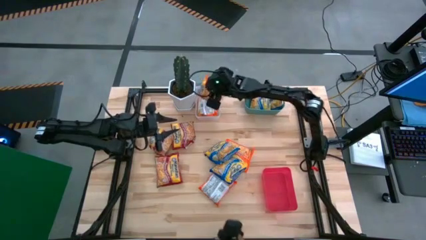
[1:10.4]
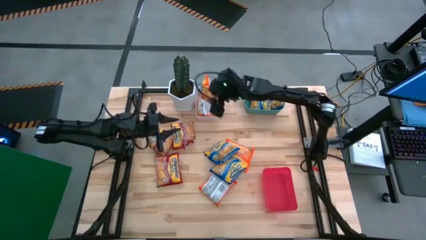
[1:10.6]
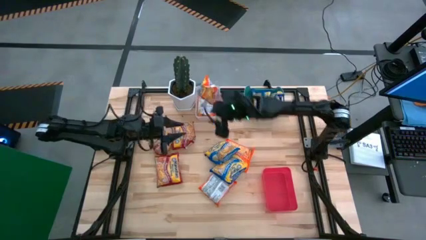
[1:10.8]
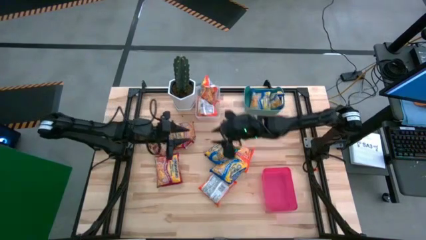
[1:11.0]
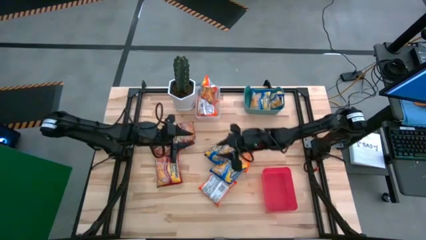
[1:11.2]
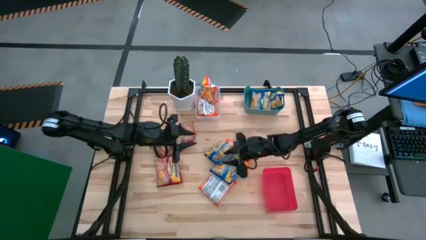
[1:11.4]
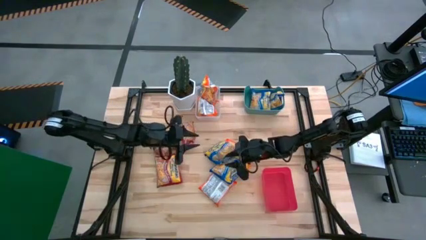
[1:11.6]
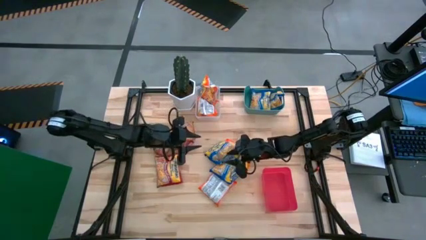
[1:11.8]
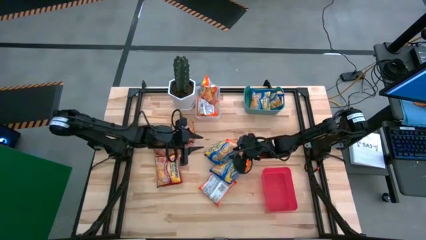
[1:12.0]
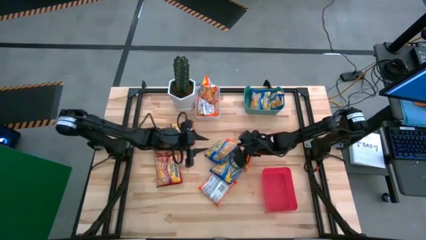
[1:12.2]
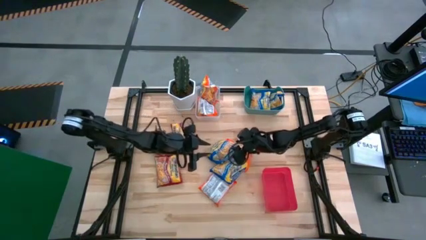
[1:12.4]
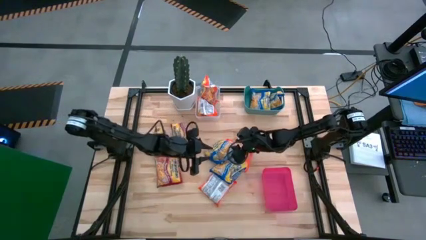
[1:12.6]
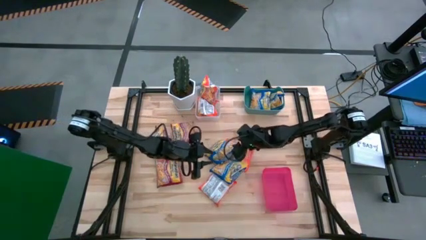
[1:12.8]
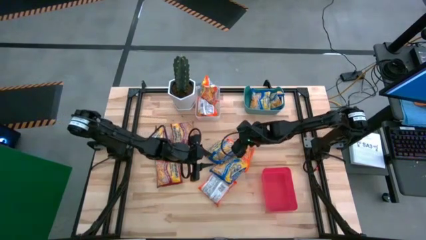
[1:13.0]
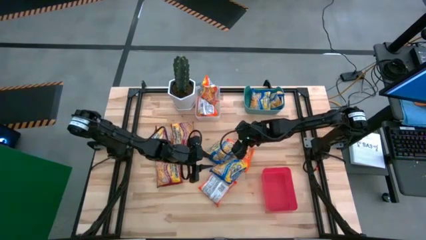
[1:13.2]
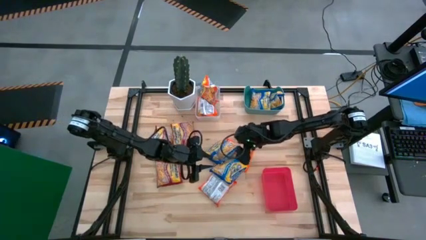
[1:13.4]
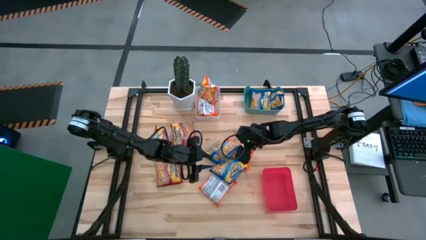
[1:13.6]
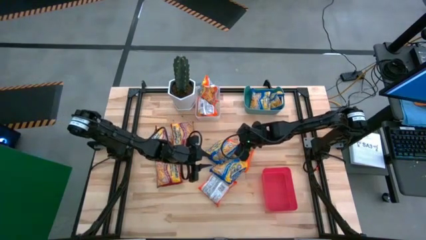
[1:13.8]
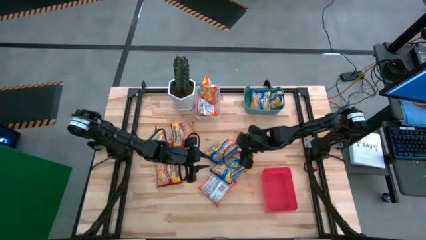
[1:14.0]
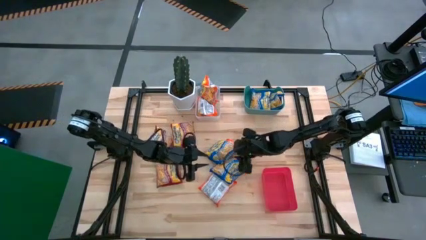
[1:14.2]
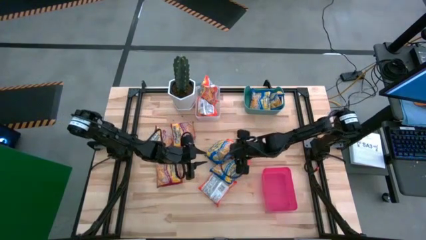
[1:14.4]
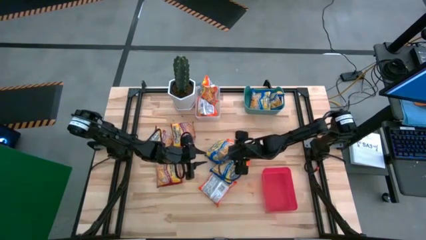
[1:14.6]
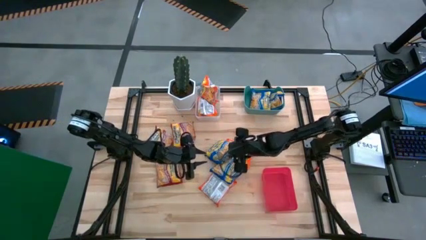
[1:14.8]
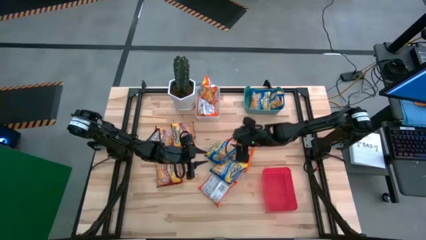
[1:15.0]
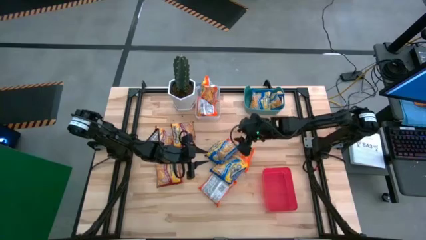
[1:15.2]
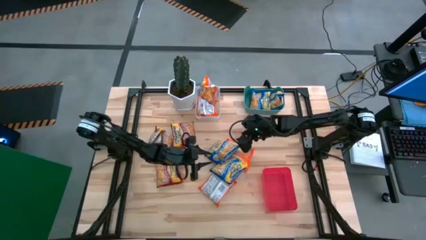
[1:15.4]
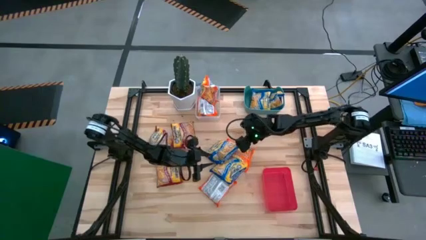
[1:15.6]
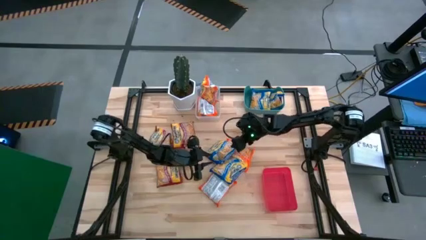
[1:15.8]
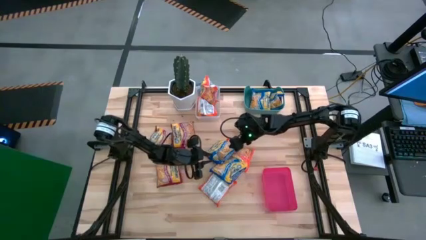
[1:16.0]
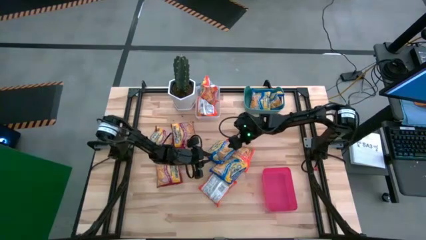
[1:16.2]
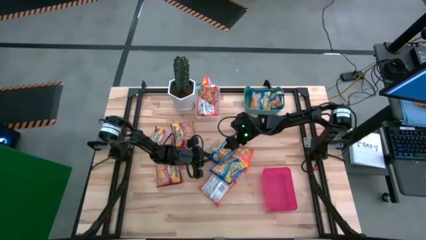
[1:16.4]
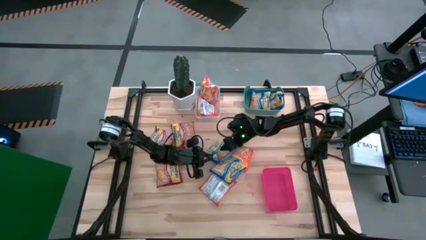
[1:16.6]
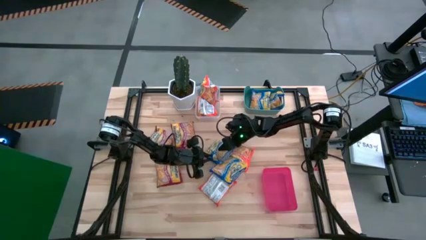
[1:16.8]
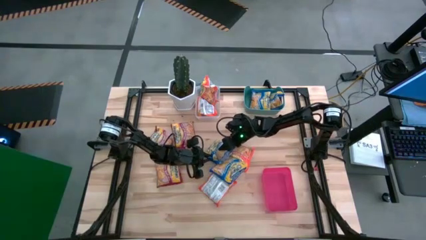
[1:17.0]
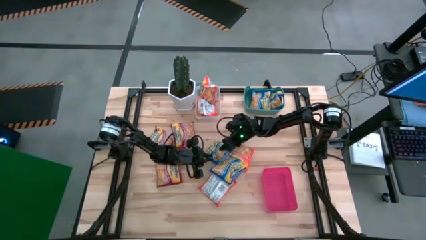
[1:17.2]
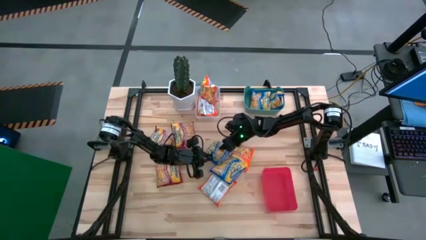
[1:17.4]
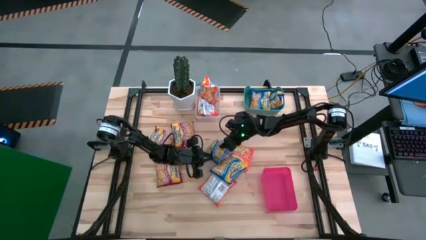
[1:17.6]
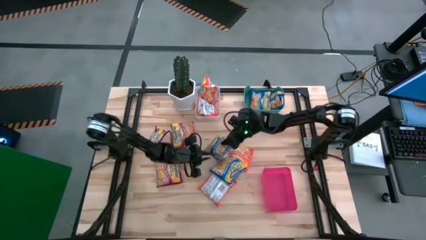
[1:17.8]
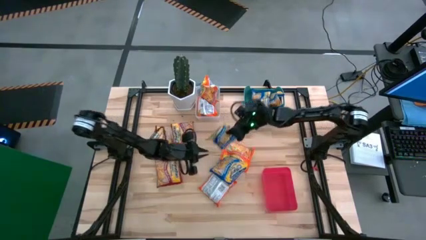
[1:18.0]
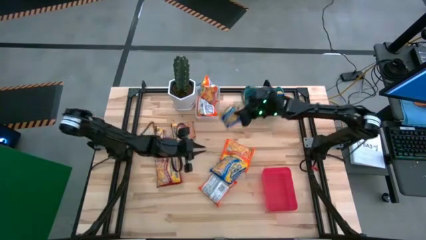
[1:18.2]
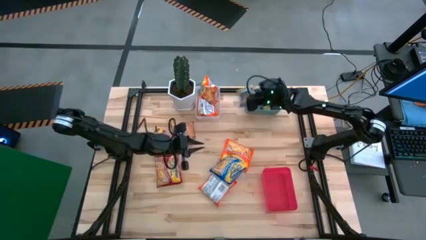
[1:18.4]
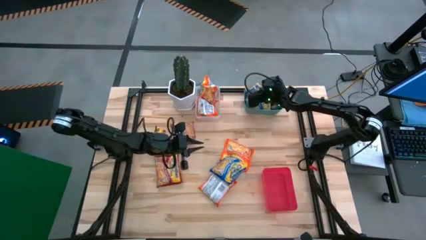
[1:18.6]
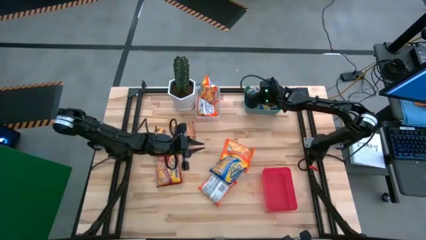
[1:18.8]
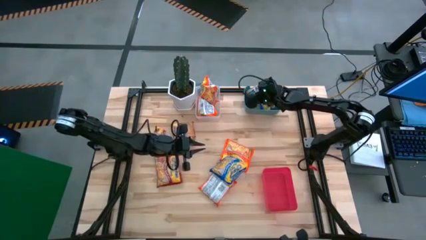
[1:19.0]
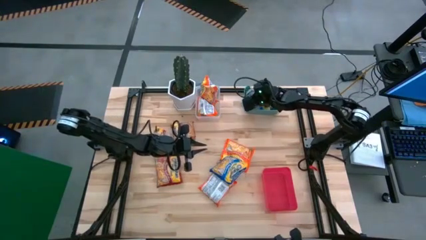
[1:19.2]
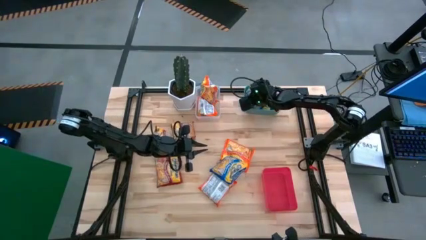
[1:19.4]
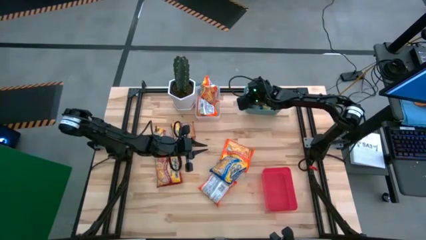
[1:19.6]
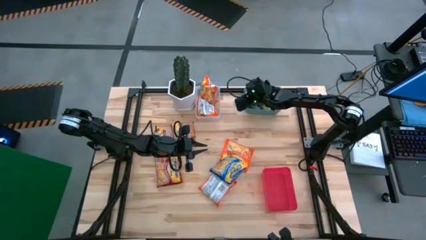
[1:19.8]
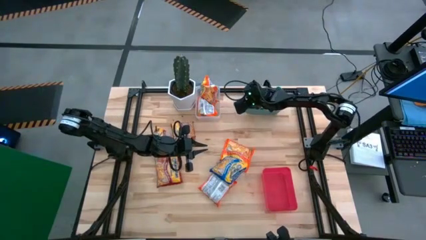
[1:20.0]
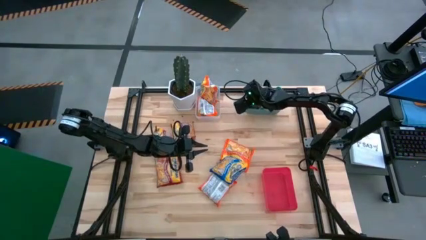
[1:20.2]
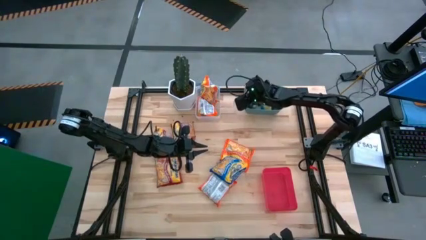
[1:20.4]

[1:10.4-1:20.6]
Task: Sort Maruchan noodles
Put the blue noodle pack into the green bin

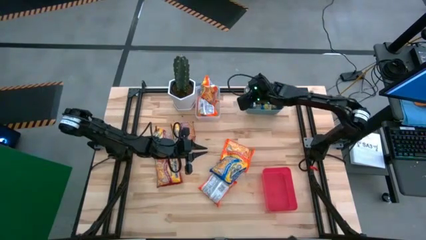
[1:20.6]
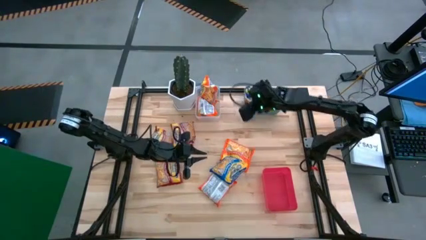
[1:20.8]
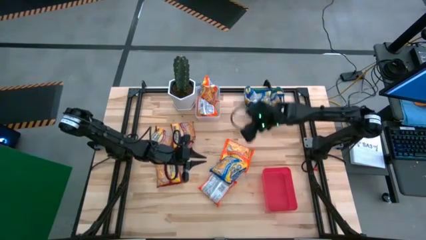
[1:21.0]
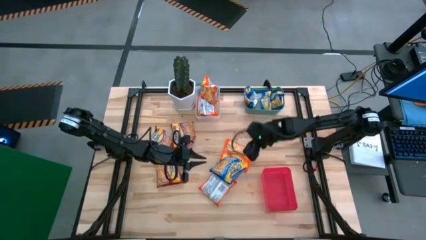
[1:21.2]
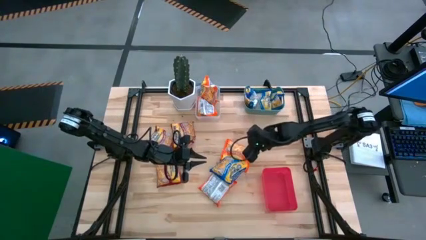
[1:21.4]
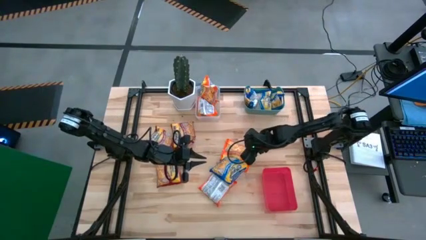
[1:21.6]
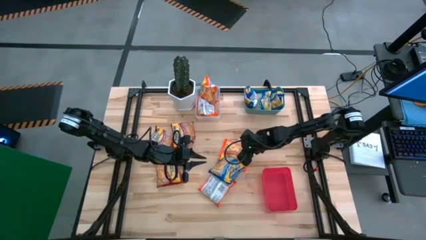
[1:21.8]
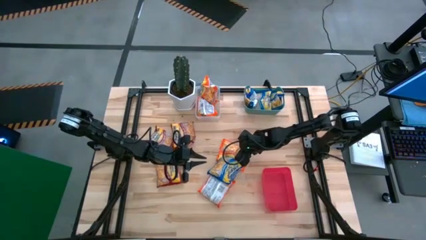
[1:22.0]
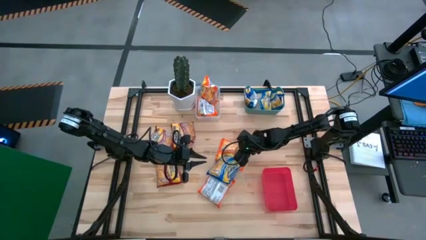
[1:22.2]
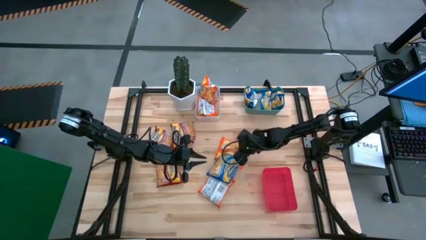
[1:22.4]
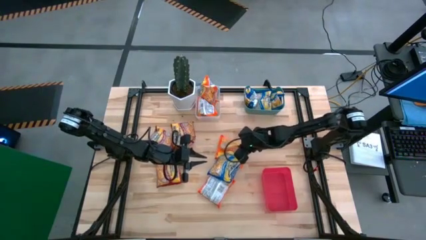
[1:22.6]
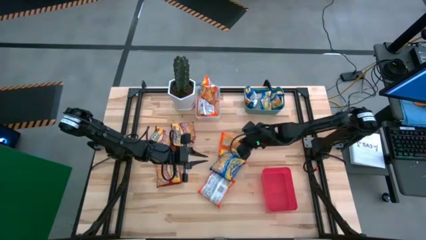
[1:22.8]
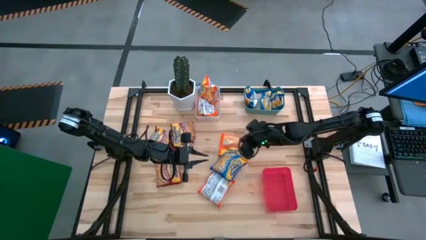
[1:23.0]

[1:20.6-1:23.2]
Put the orange noodle pack into the transparent bin

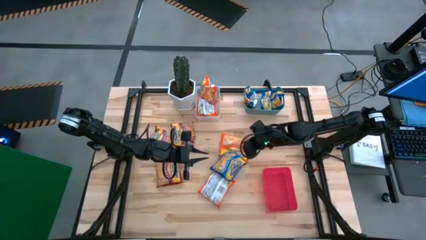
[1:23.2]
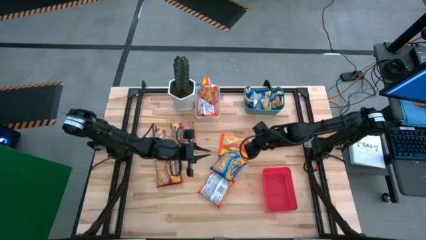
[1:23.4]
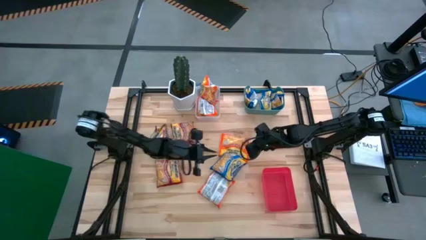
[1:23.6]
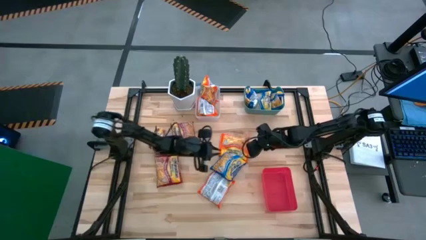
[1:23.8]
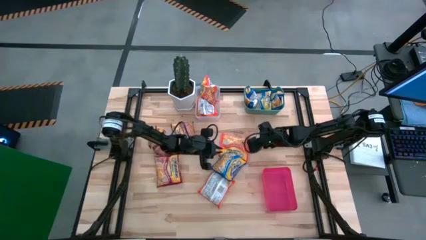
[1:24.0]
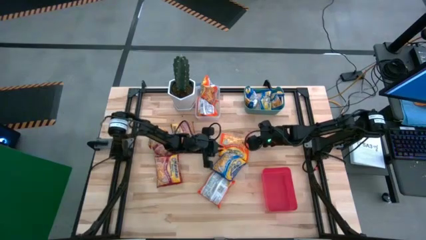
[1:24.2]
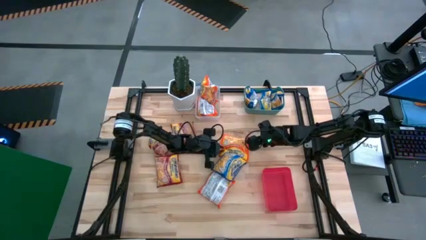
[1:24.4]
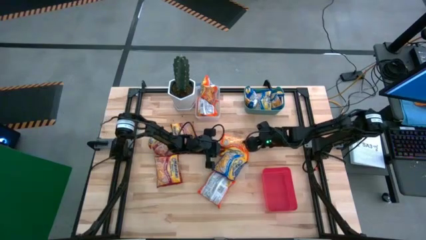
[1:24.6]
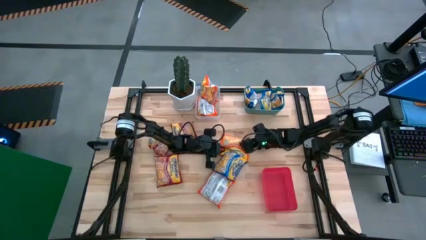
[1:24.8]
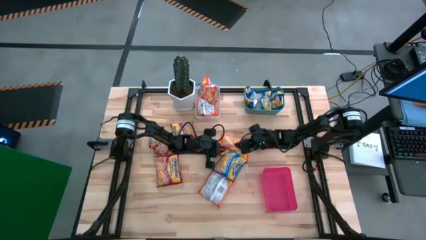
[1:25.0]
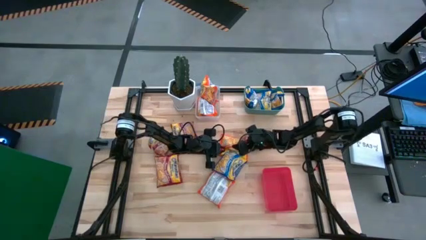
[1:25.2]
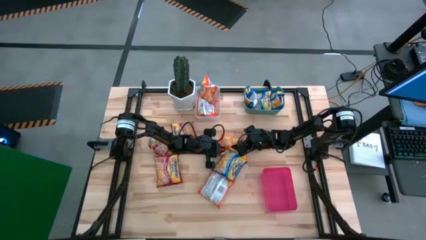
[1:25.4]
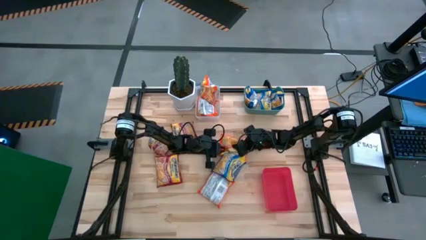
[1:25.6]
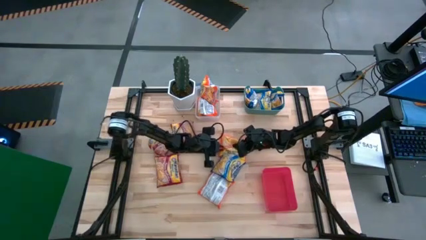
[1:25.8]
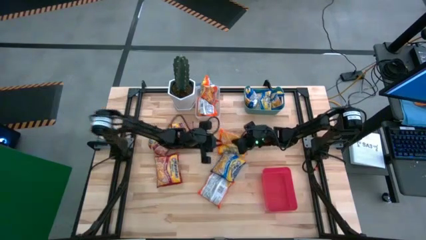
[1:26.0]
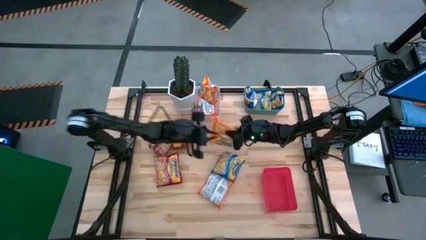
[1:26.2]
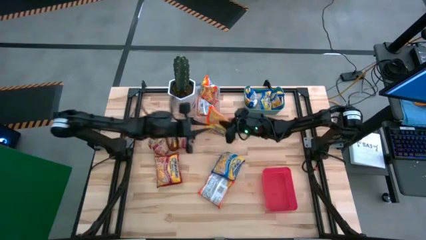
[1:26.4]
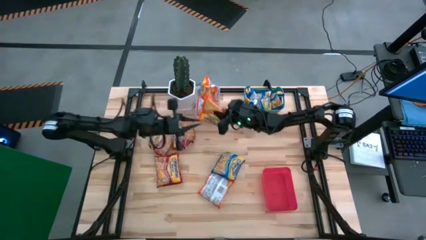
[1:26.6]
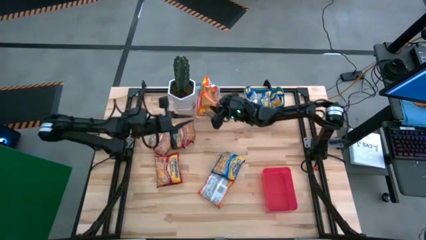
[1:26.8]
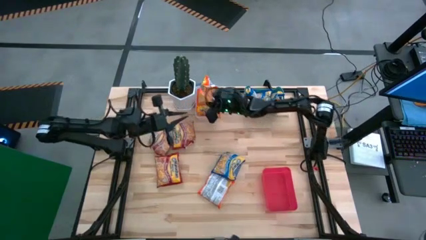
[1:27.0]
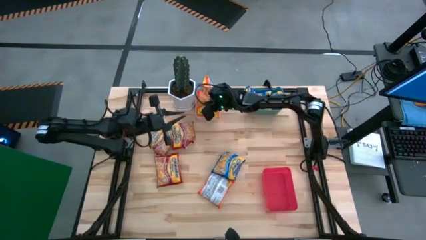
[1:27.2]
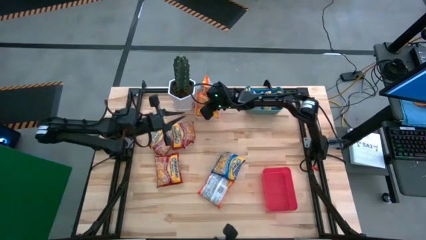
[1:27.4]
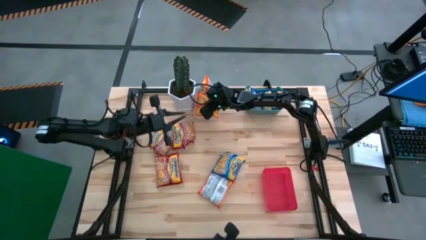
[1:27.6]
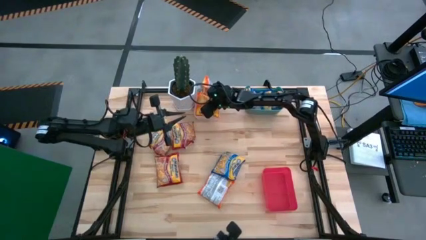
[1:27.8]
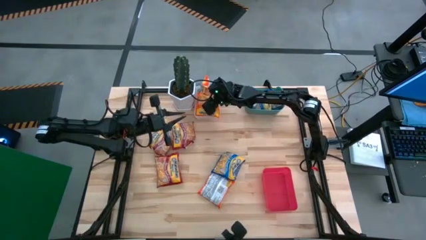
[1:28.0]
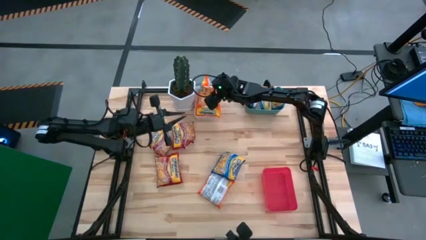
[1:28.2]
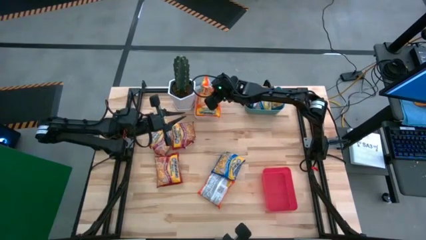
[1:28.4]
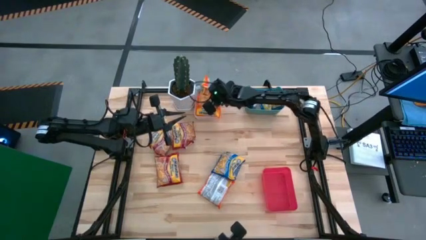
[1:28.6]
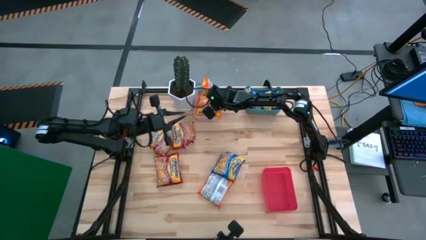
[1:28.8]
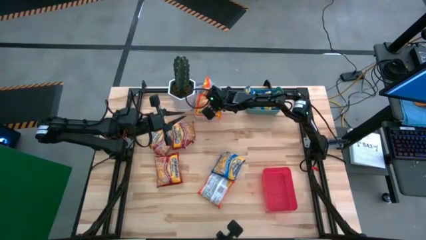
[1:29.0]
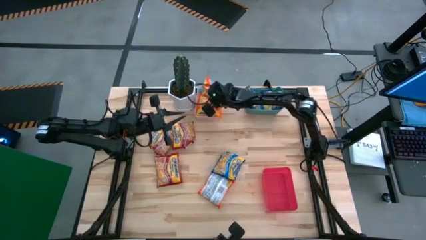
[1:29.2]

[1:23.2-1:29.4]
Put the orange noodle pack into the transparent bin
